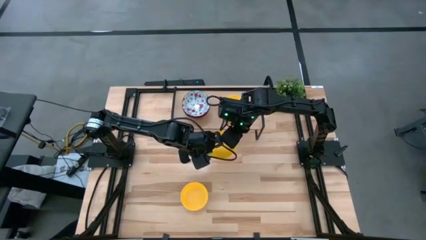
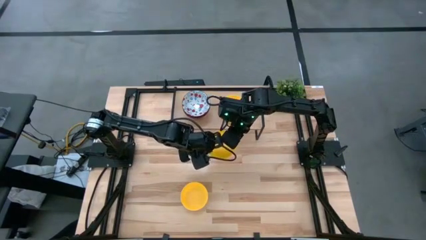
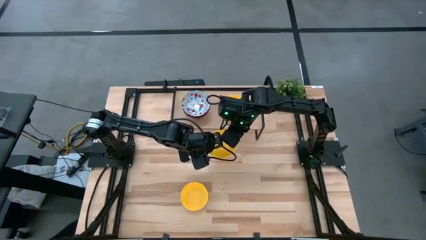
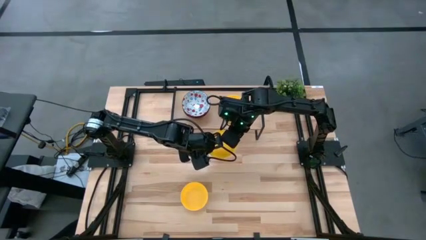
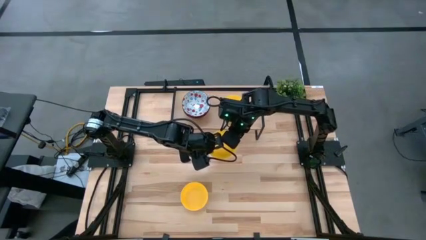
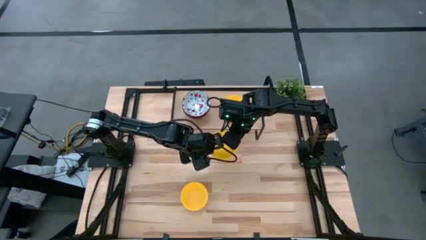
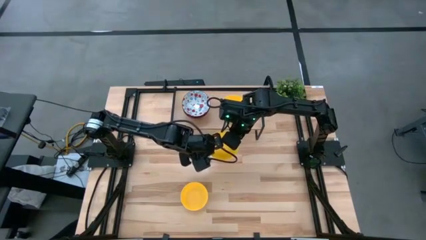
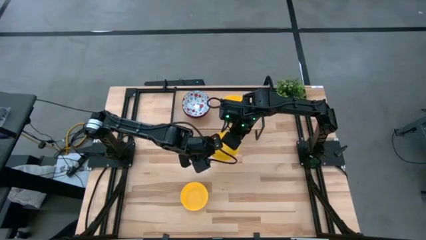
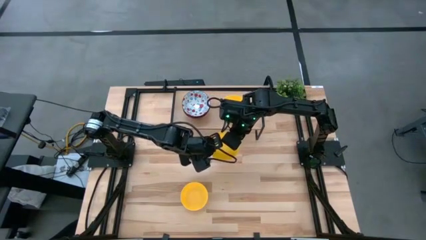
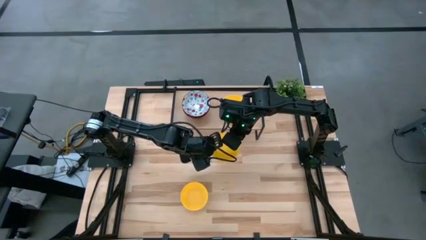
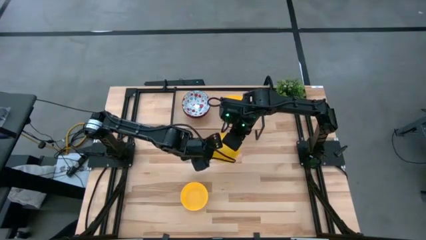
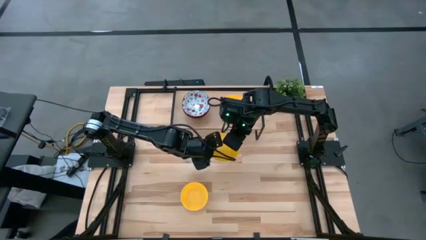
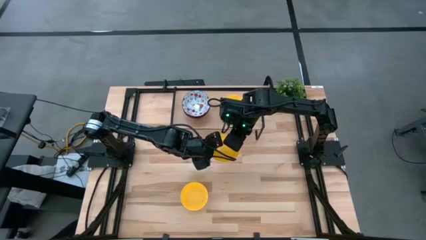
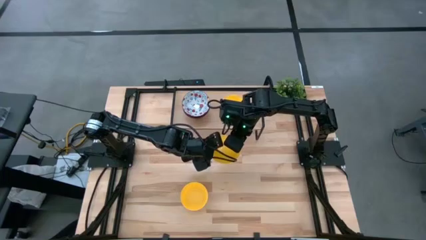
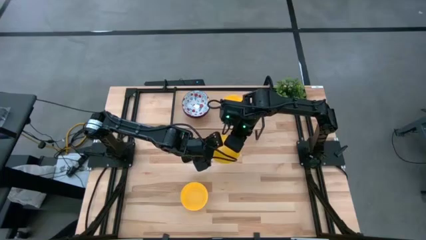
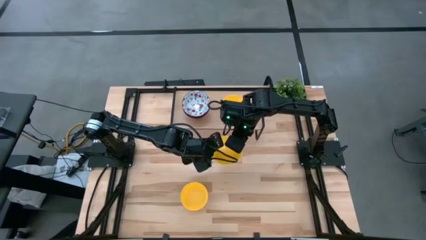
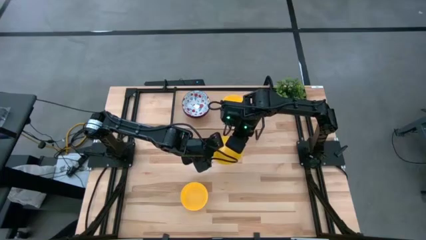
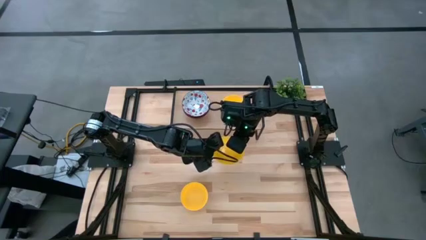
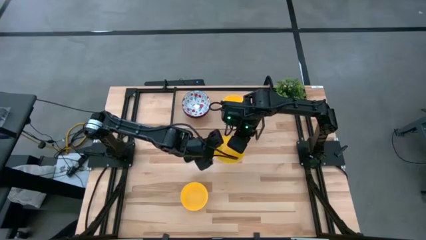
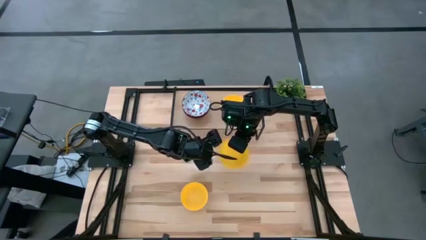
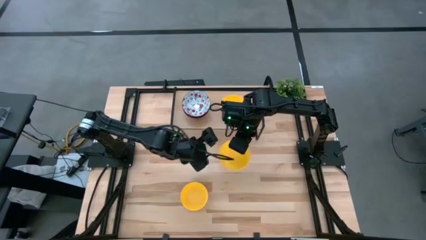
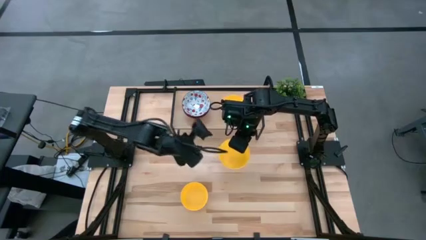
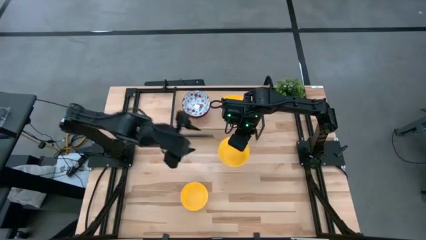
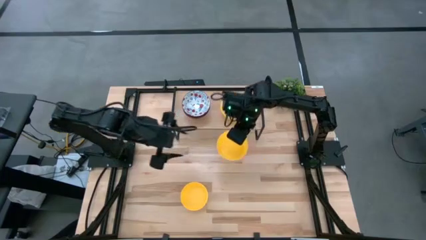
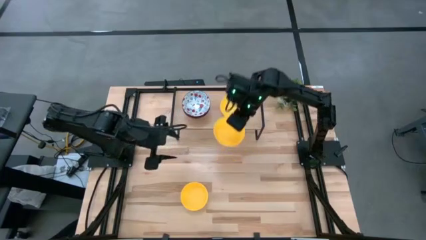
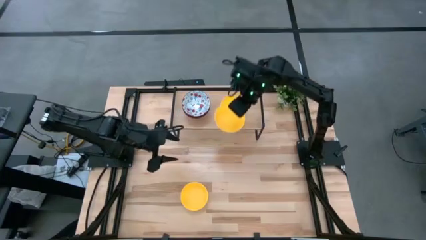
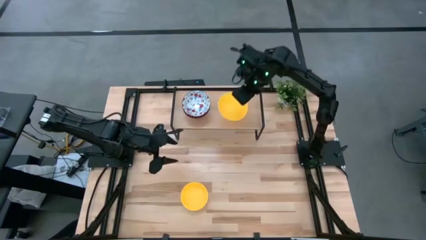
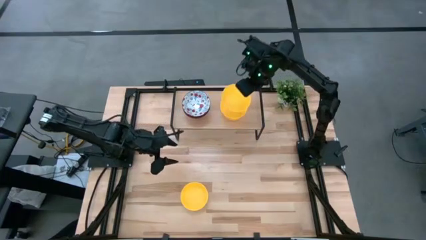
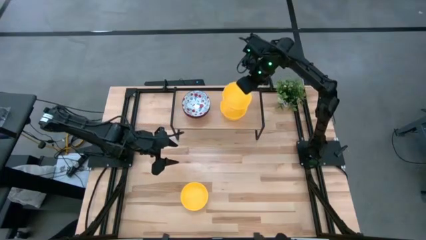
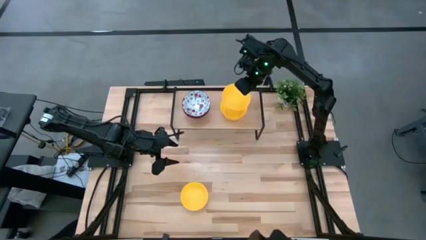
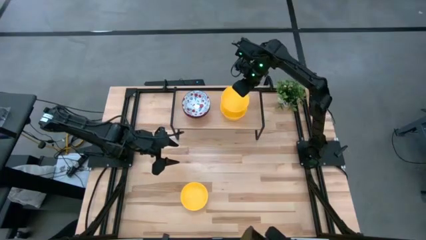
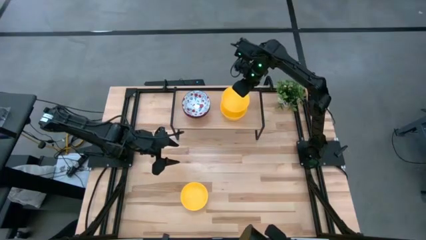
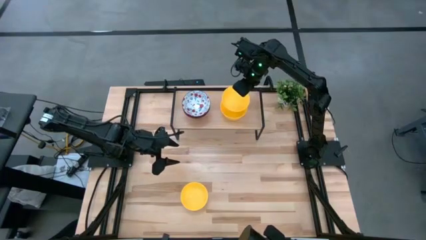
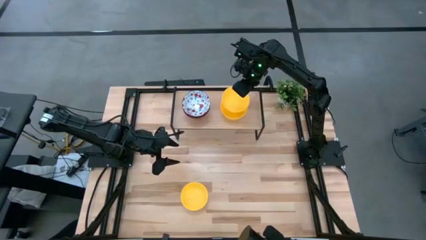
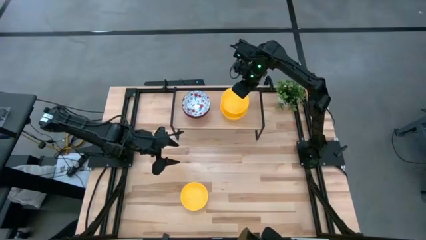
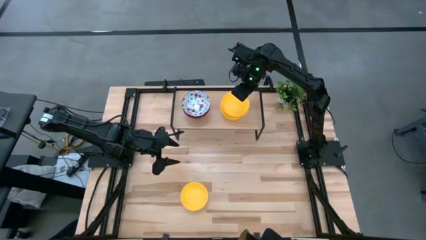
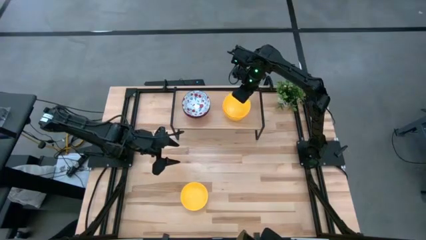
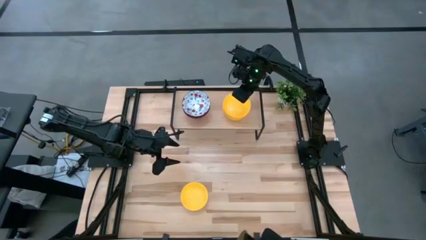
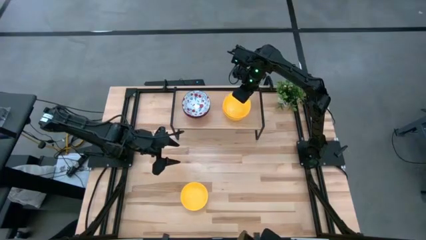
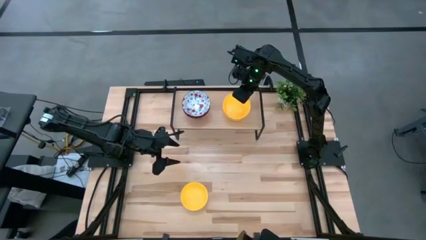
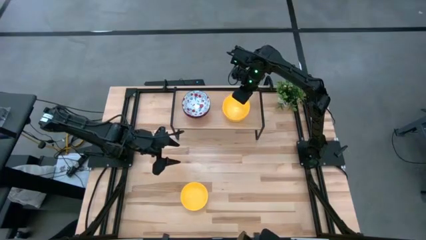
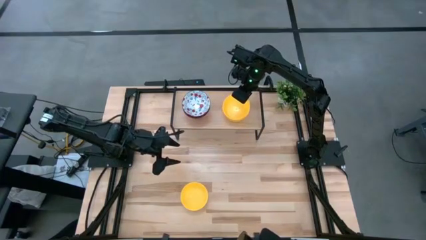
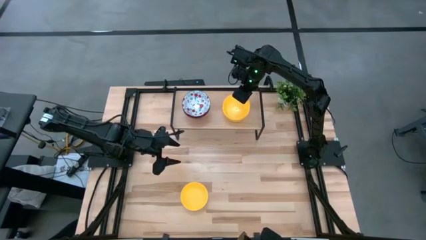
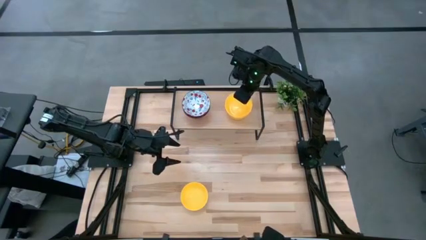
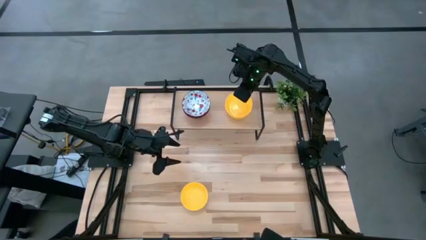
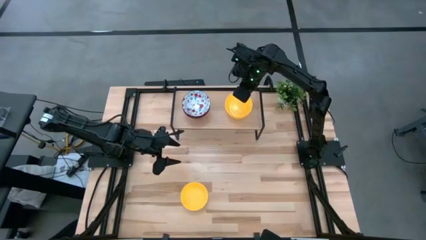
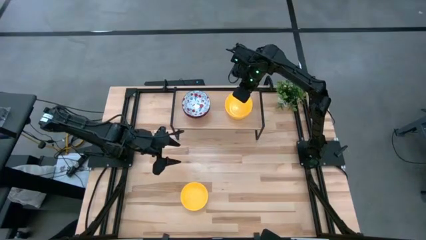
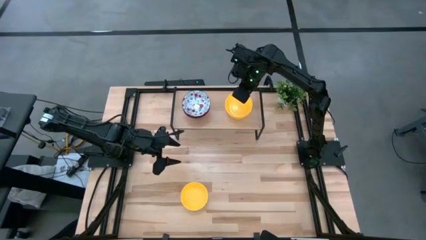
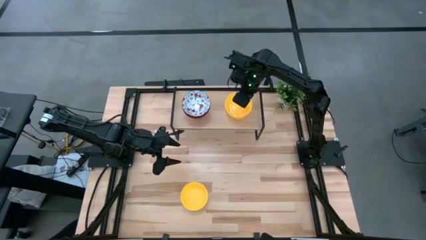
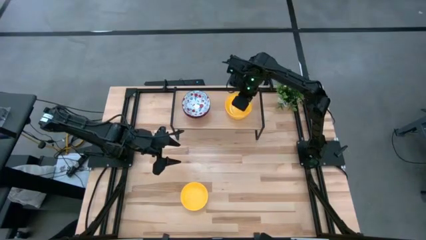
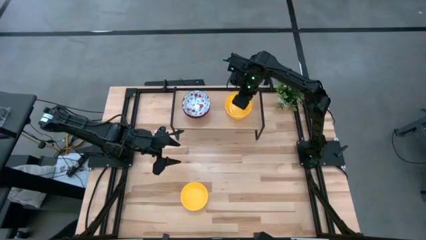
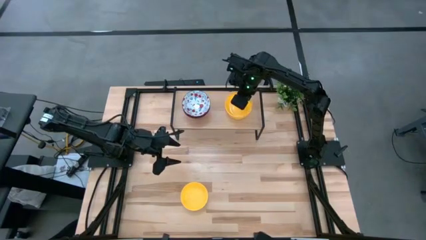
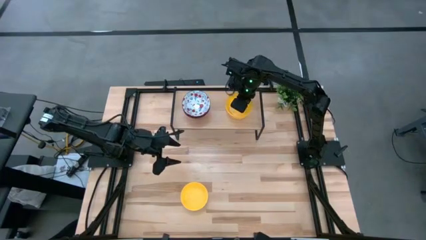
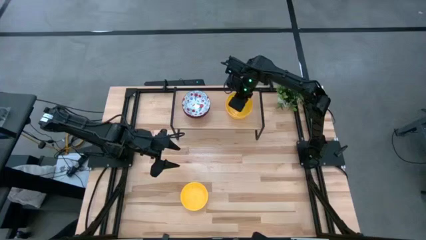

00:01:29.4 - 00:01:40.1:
Task: Pick & Place Mini bowls
Stack the top yellow bowl on the yellow bowl on the shelf

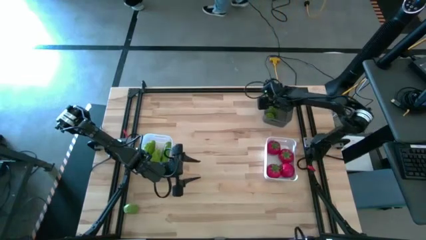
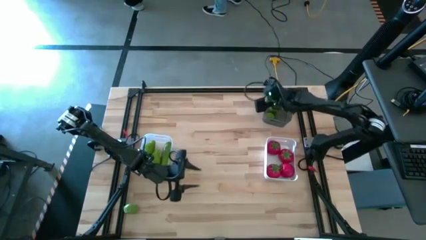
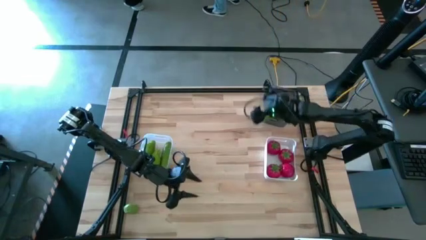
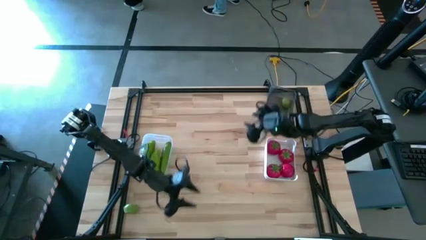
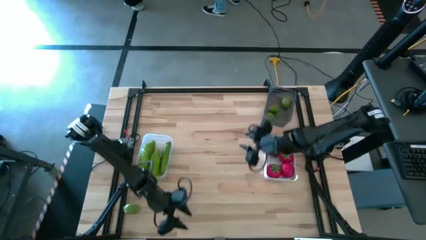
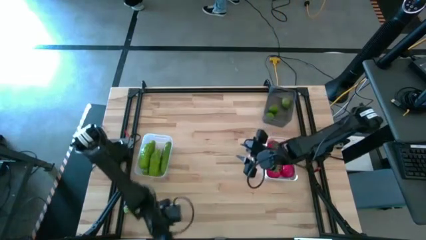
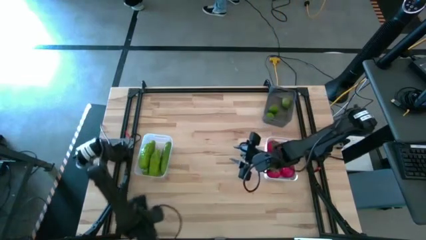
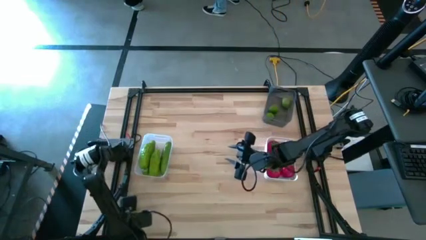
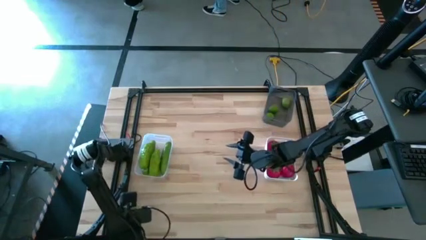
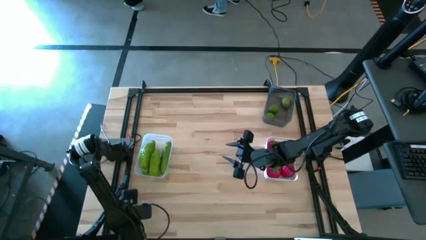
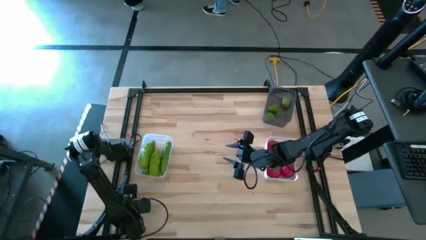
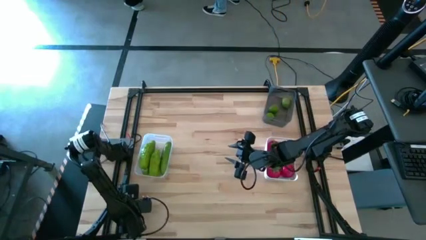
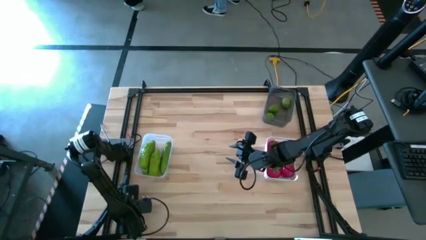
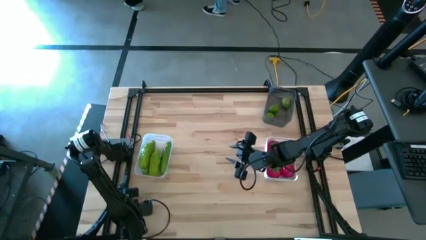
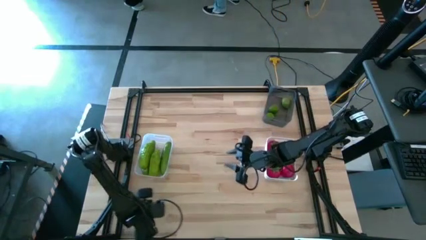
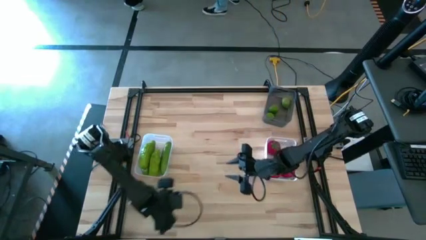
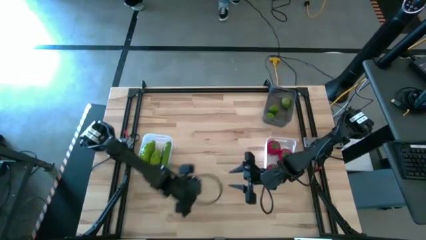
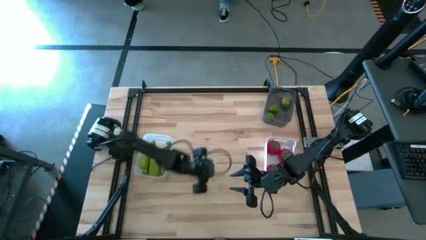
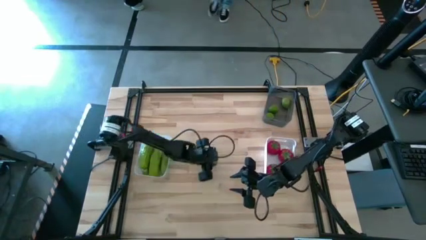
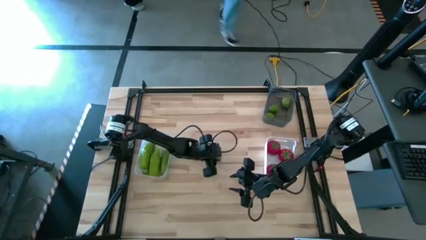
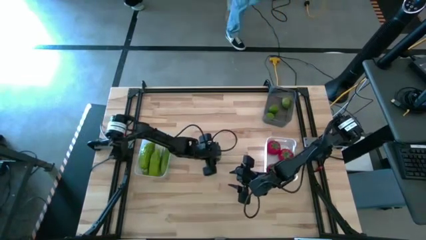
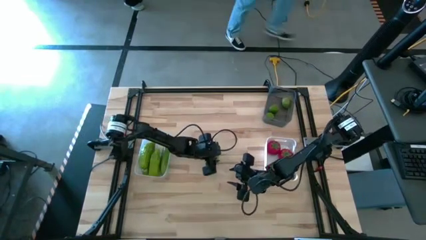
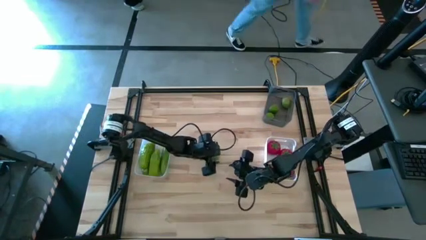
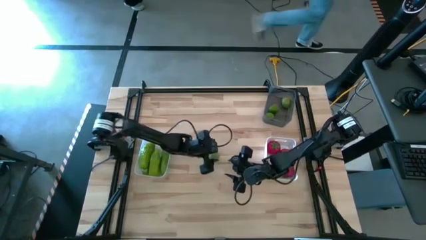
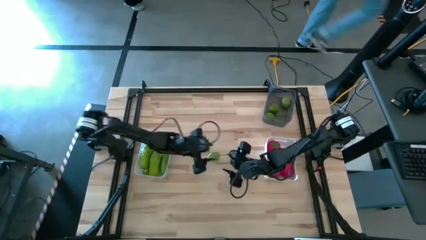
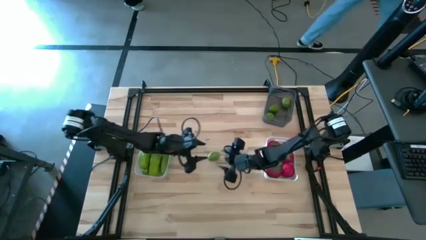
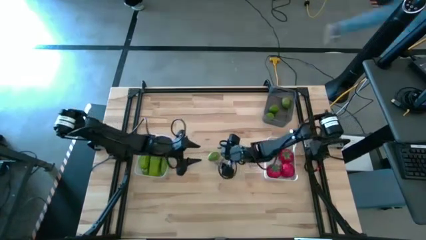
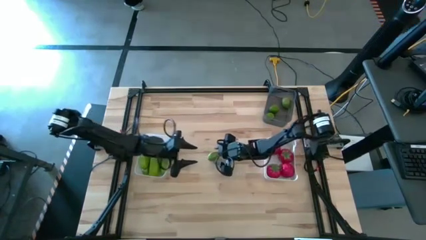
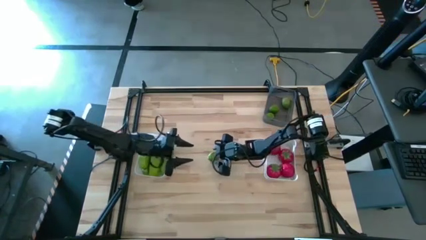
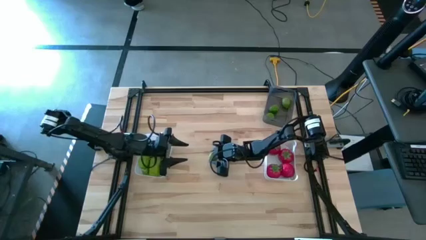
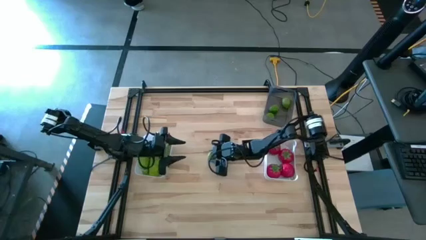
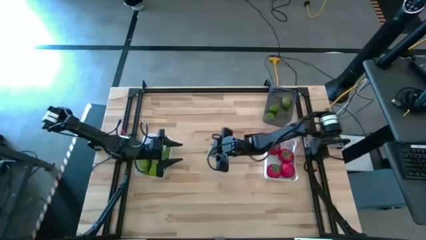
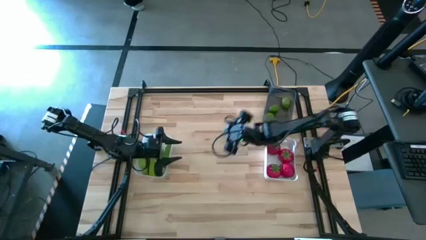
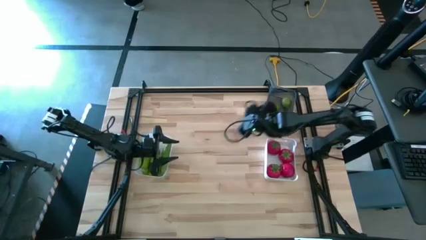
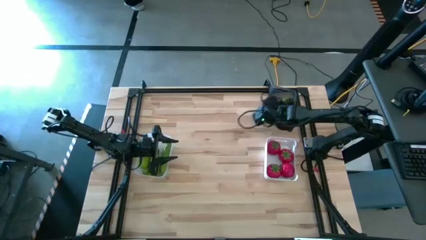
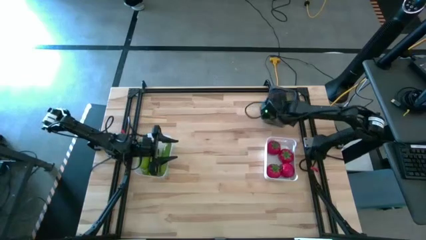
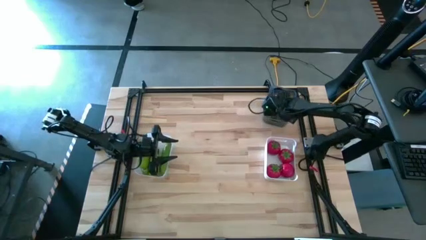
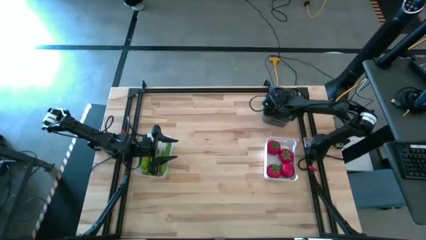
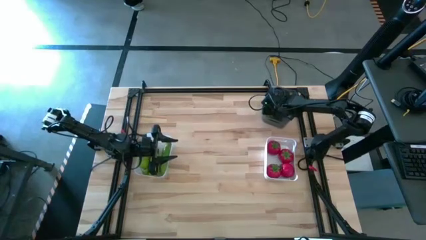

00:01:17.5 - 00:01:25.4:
Task: Sort produce into baskets
Put the lime into the black bin
